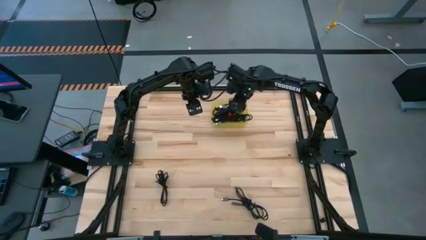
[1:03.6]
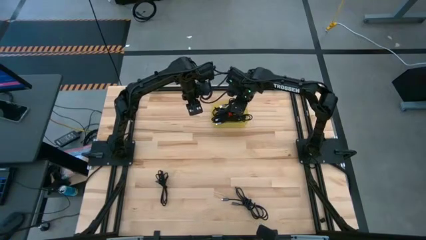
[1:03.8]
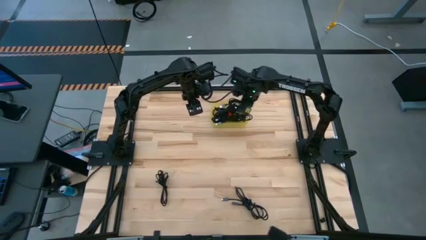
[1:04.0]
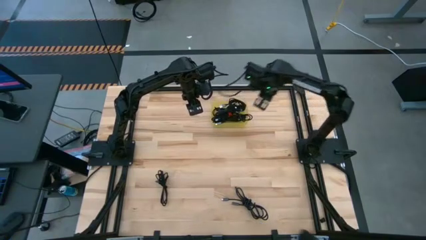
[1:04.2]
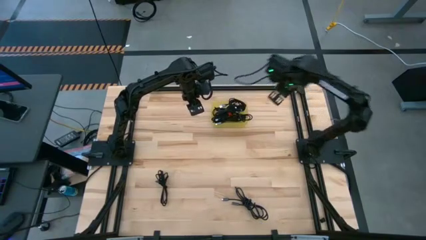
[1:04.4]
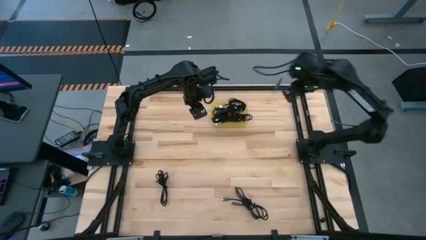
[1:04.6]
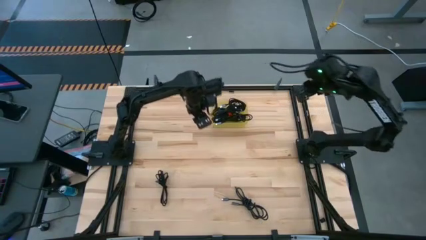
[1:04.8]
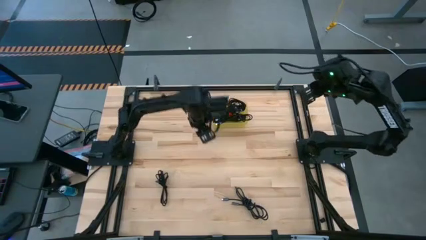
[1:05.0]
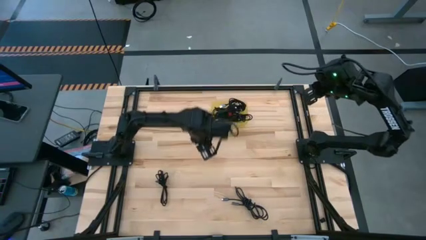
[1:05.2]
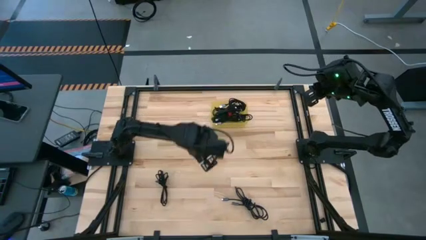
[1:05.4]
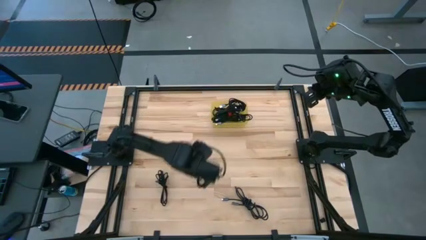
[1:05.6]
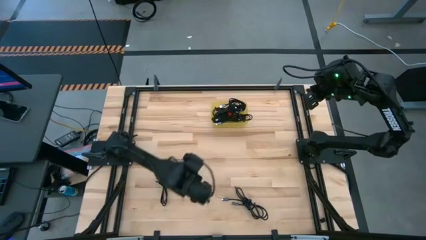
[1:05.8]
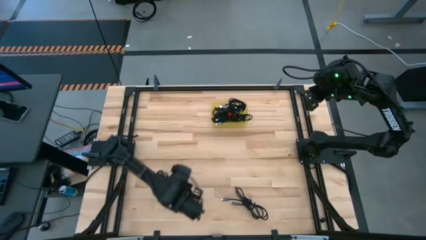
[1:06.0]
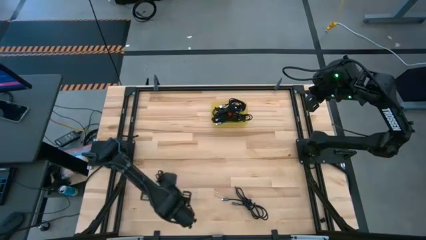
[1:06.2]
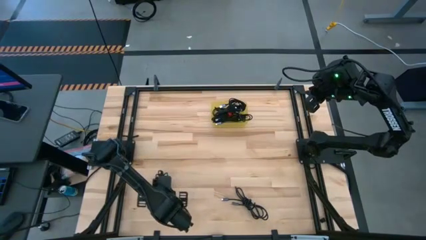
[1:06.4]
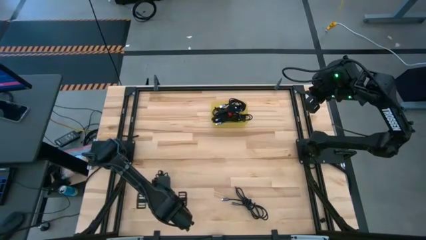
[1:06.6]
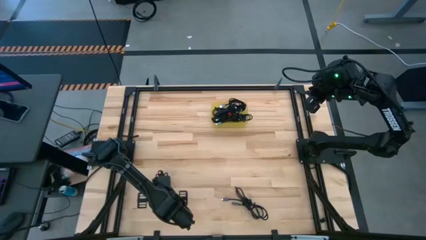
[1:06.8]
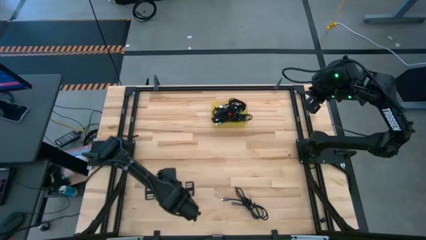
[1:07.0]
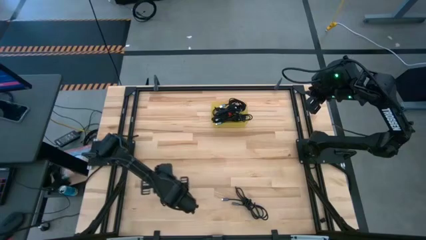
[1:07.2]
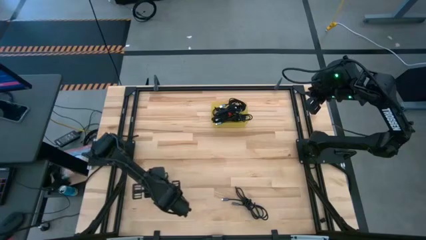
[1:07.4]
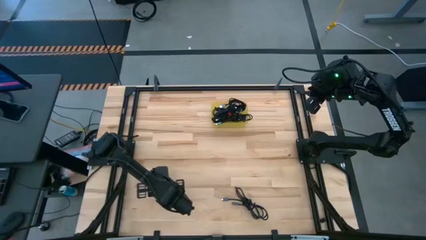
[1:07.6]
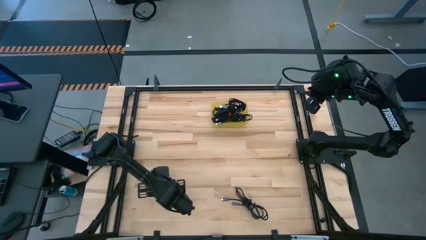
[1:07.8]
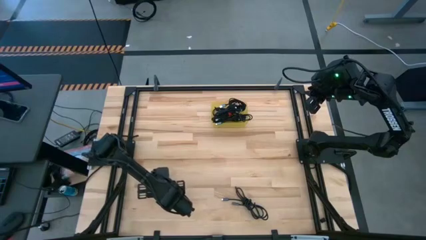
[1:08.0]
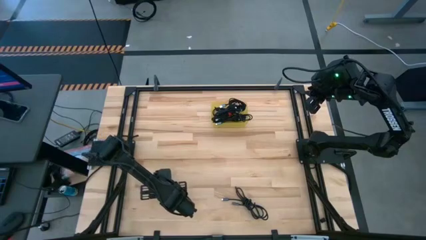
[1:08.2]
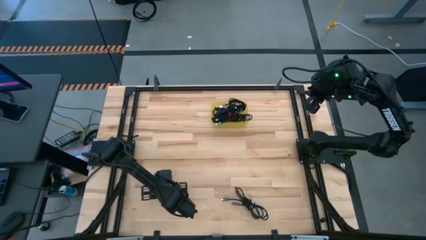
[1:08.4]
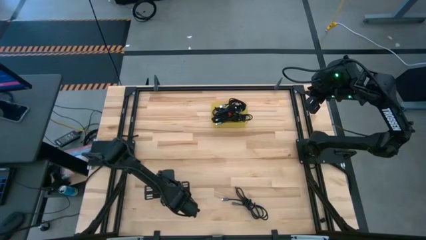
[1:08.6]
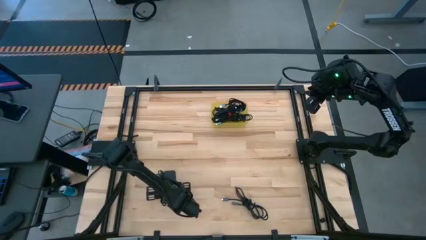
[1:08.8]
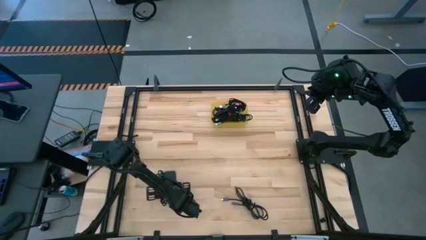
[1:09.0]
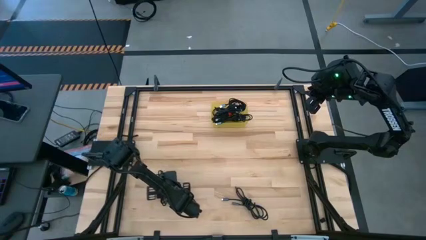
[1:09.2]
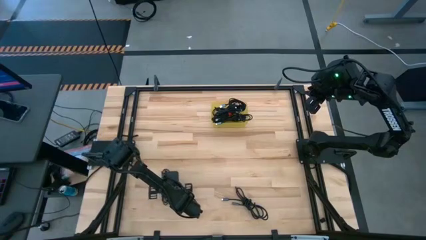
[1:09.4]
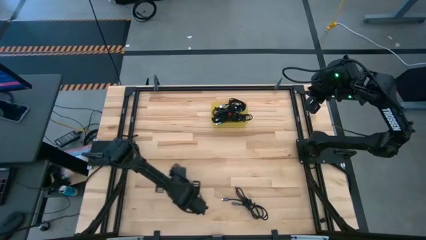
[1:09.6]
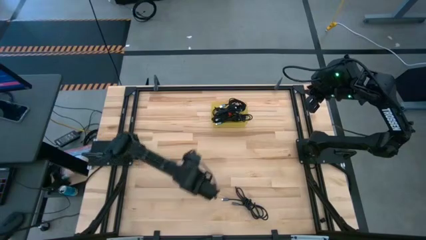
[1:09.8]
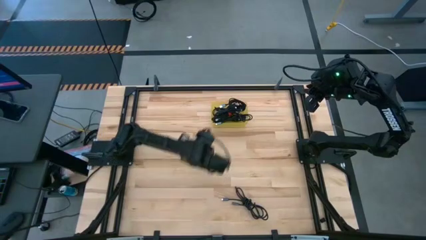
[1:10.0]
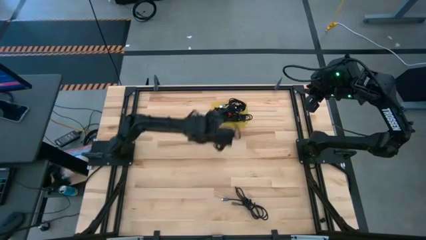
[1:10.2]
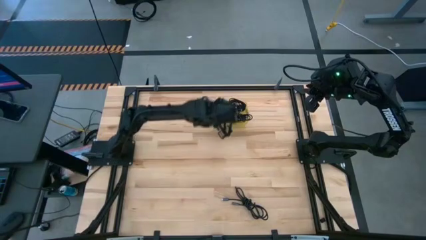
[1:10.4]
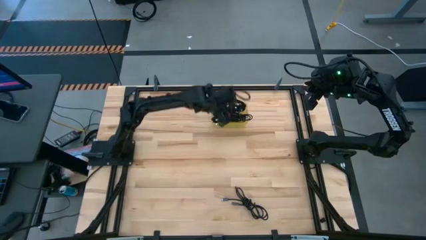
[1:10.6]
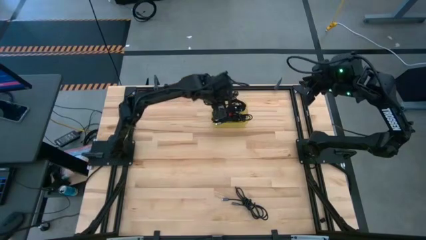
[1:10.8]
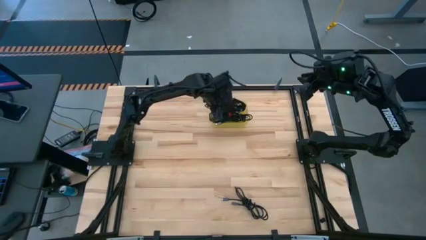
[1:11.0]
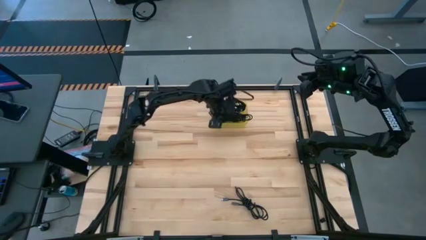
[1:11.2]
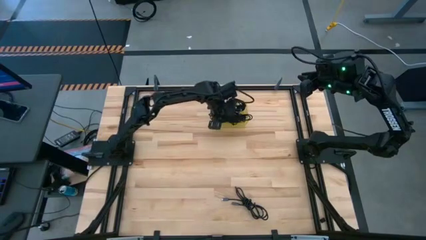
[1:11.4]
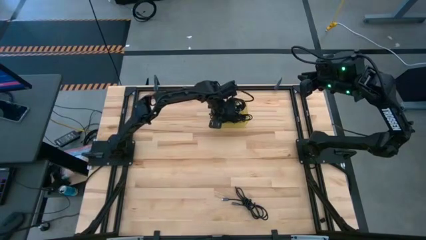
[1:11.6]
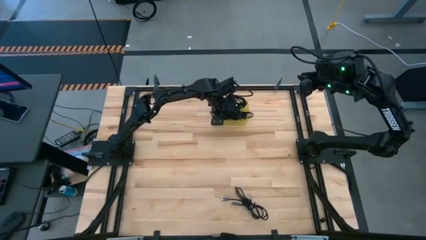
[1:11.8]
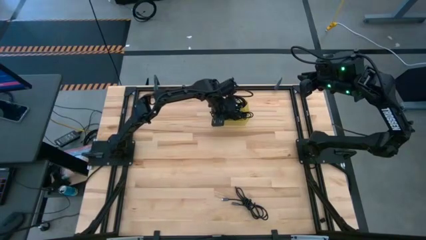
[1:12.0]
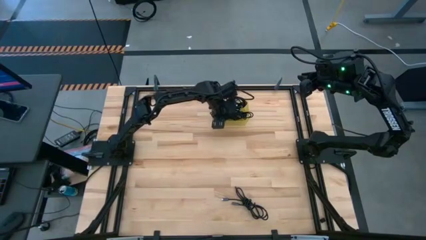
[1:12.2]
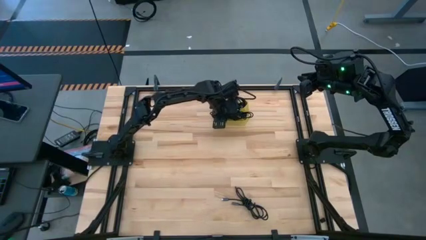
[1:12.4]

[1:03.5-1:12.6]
Task: Pick and place USB-C Cables
Put the black charger cable into the yellow bin

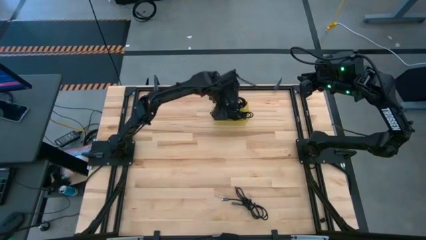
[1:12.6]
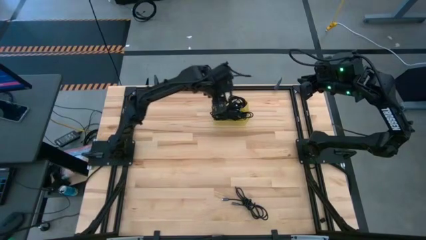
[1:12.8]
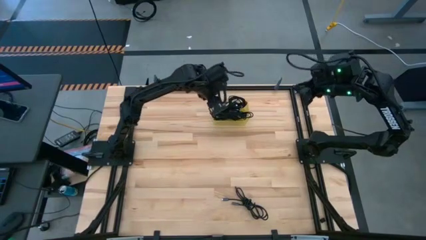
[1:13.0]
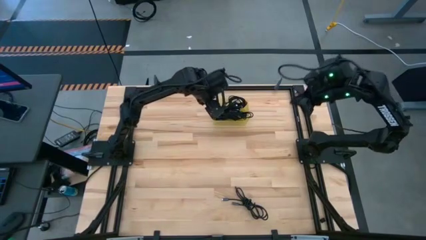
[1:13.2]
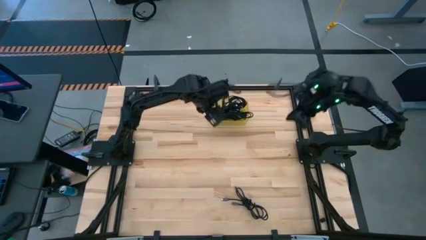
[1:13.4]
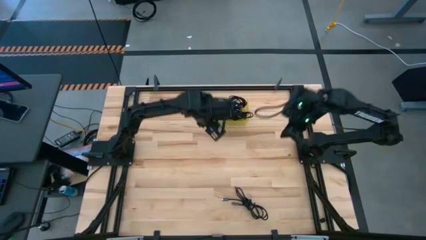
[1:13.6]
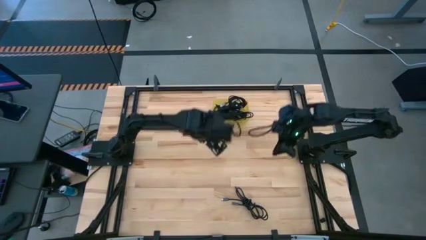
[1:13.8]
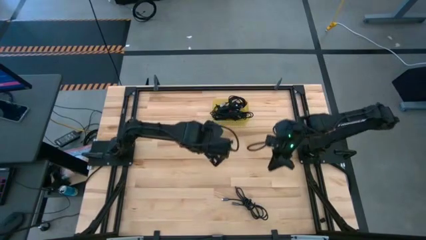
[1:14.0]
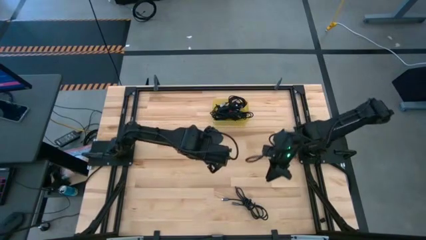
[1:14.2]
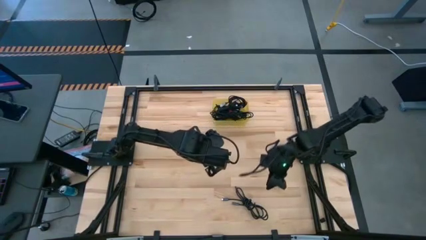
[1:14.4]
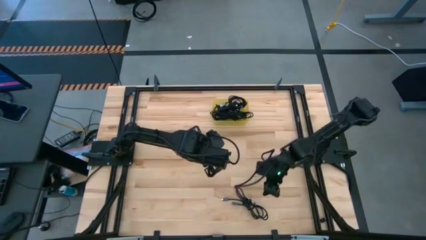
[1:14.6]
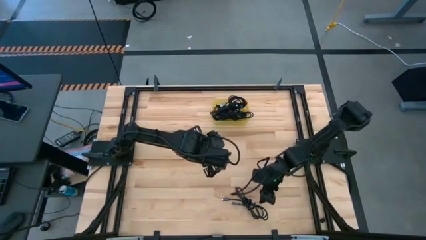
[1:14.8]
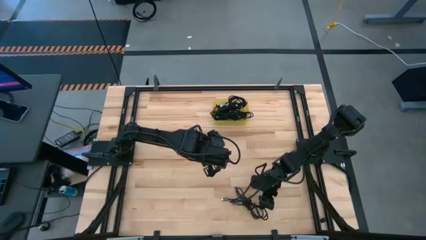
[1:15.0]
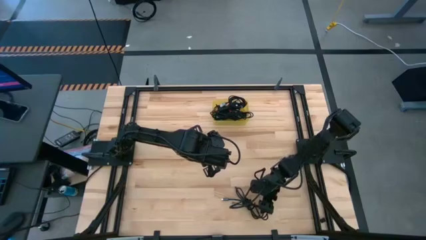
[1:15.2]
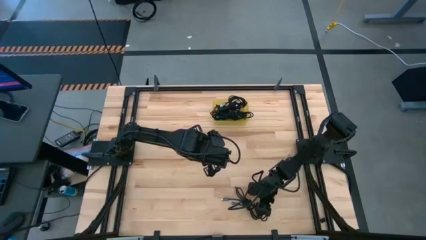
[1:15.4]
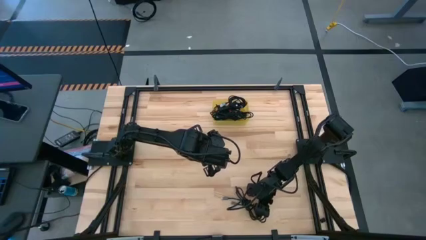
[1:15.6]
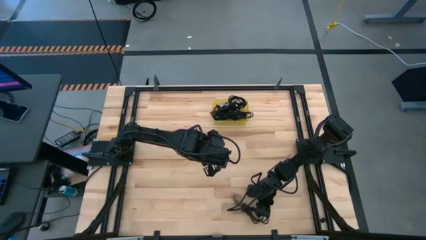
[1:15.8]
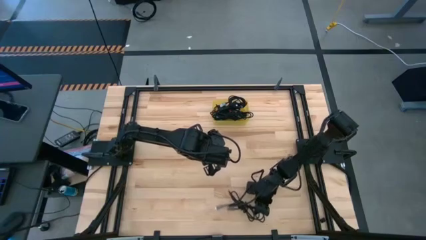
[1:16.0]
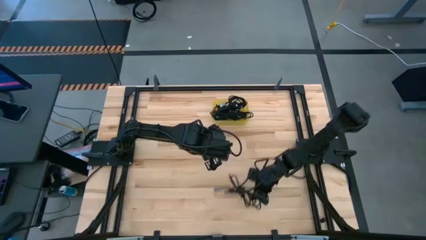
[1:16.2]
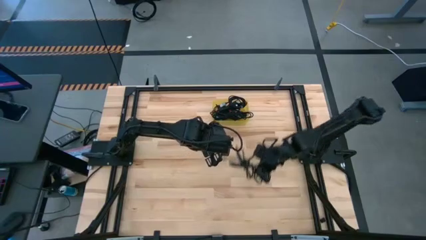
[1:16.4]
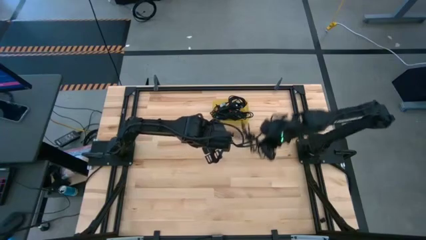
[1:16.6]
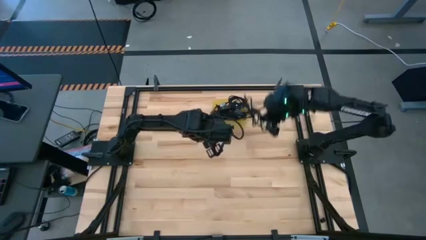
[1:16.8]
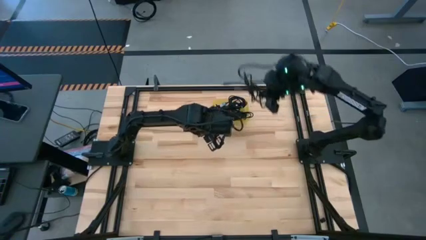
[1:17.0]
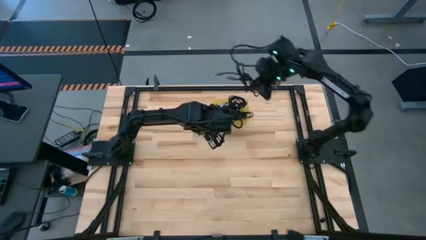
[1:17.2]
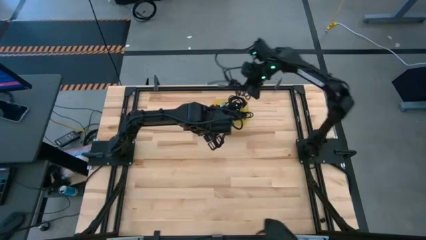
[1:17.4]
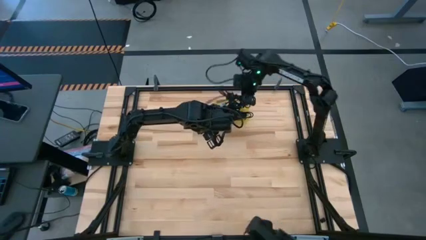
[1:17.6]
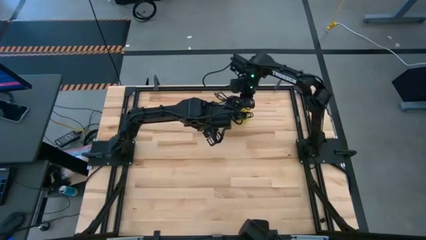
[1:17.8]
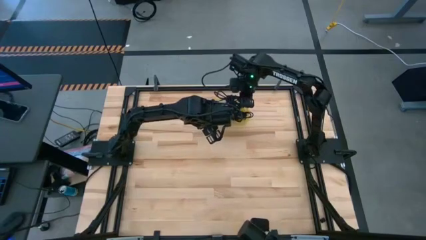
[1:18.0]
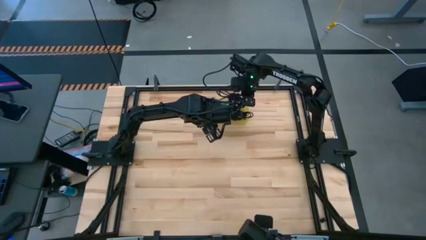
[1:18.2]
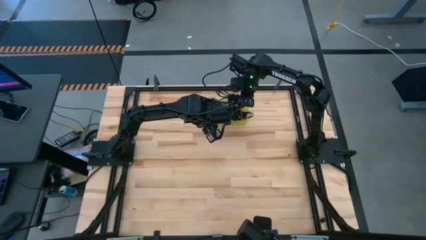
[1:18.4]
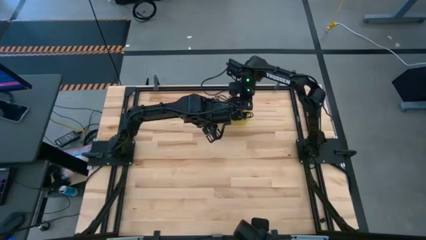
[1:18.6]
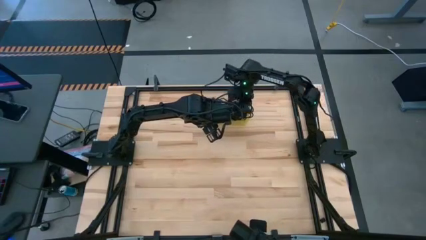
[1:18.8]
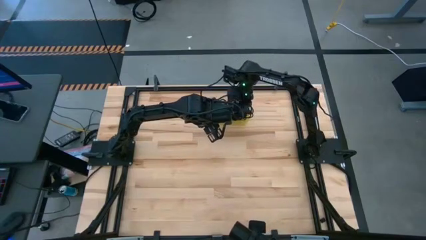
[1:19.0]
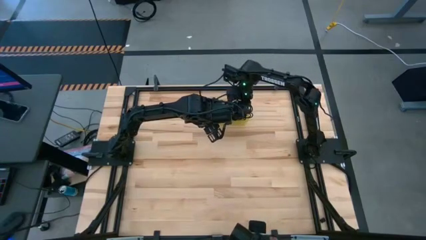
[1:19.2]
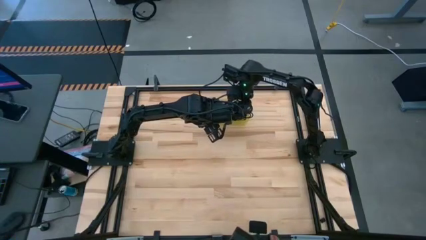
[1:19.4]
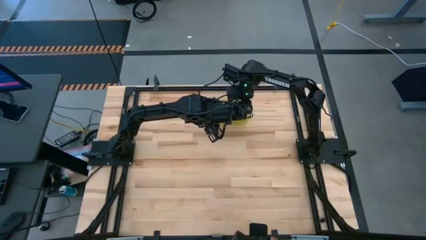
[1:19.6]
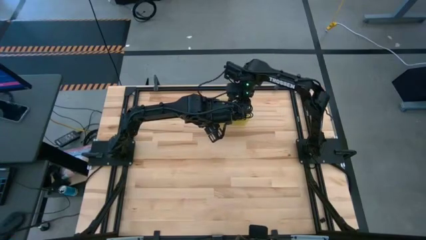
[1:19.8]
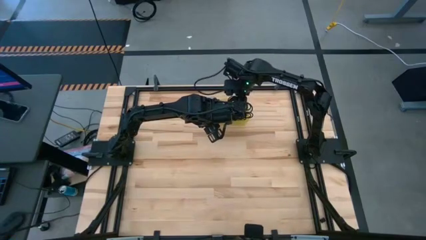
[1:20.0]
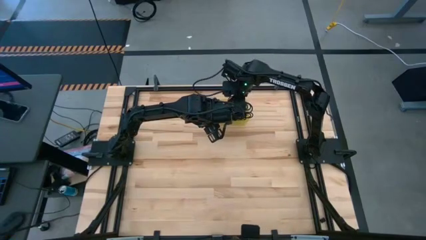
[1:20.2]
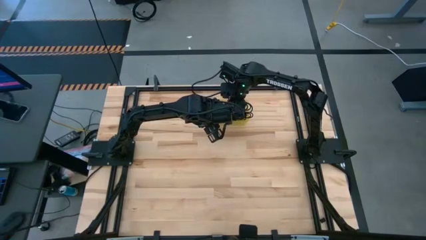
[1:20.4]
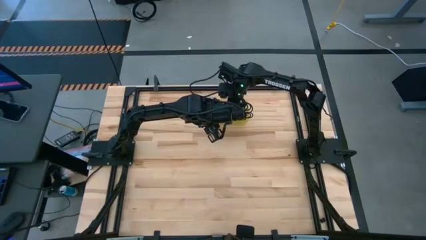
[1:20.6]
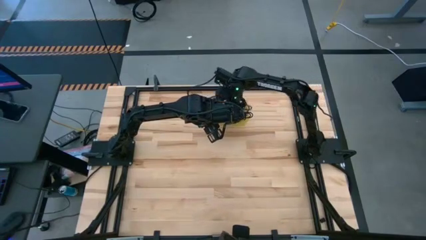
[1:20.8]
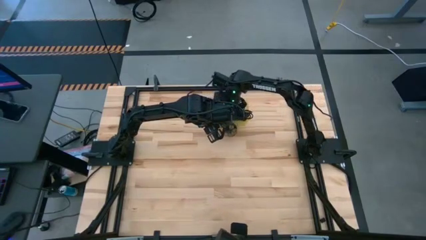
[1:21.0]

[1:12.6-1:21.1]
Put the black charger cable into the yellow bin
